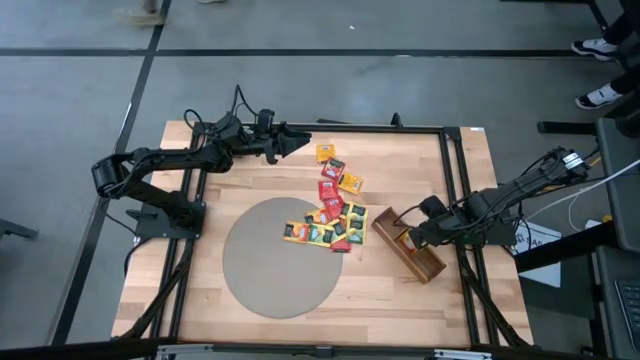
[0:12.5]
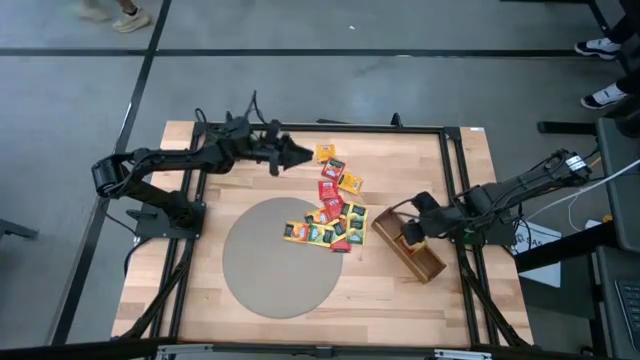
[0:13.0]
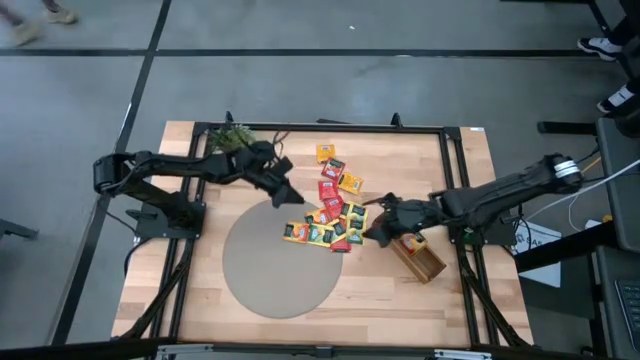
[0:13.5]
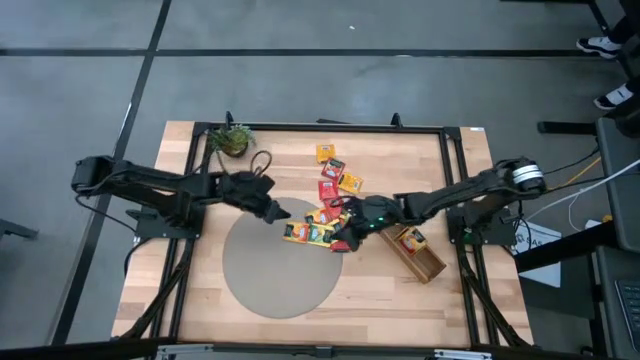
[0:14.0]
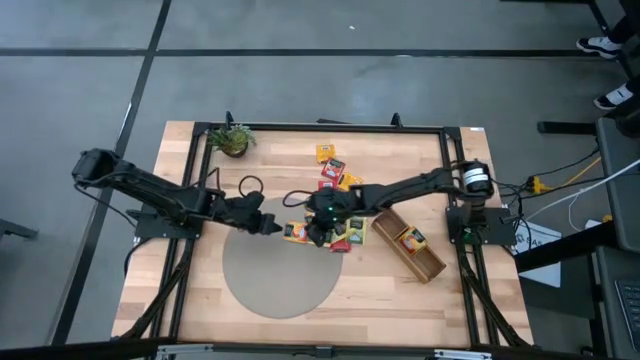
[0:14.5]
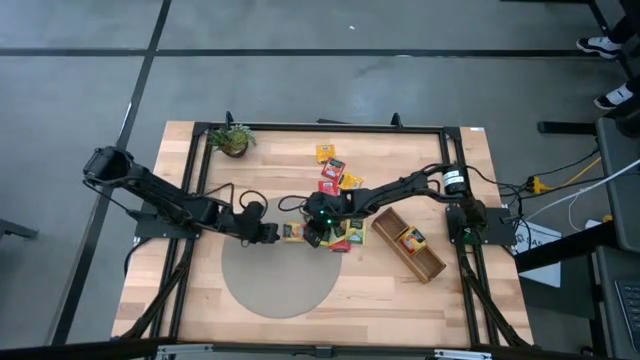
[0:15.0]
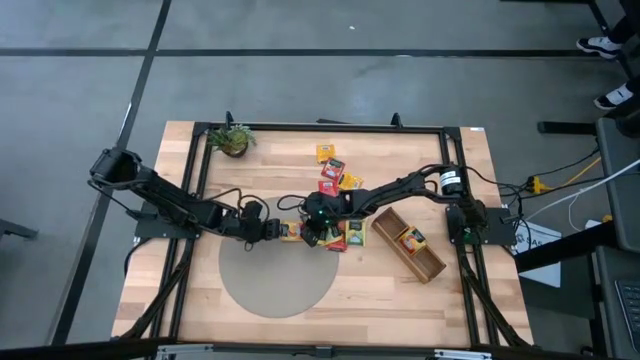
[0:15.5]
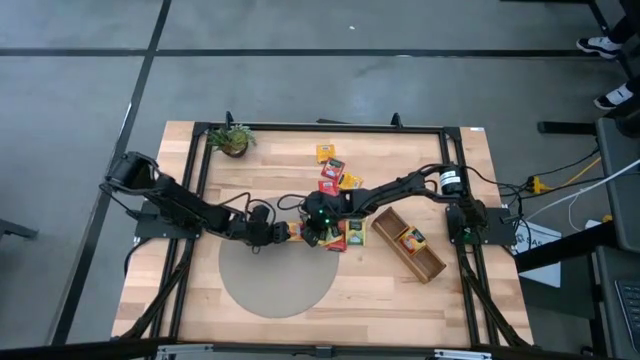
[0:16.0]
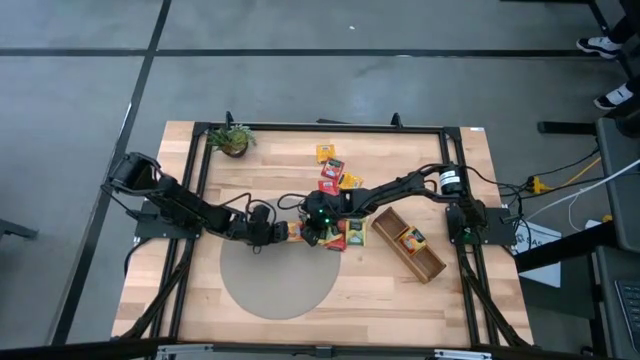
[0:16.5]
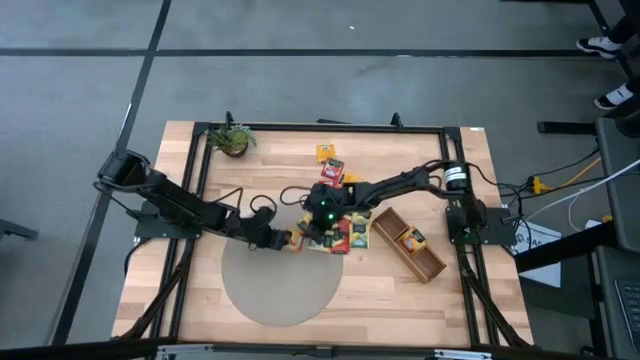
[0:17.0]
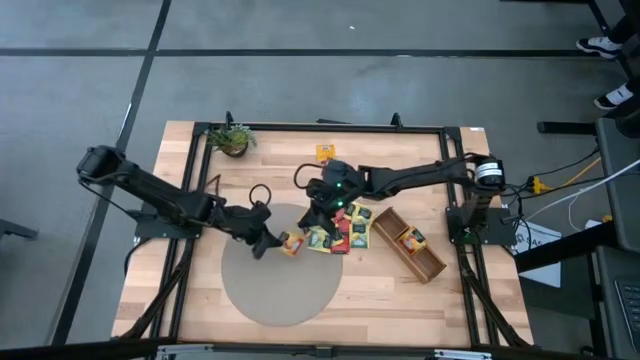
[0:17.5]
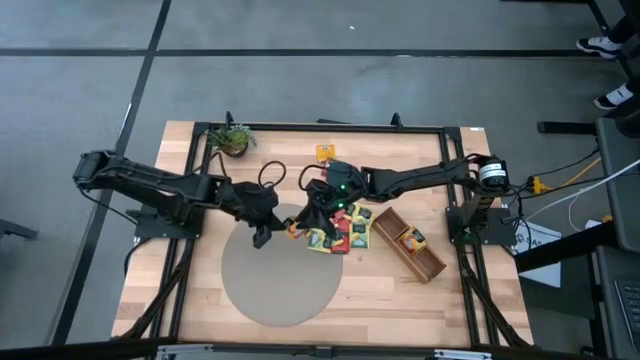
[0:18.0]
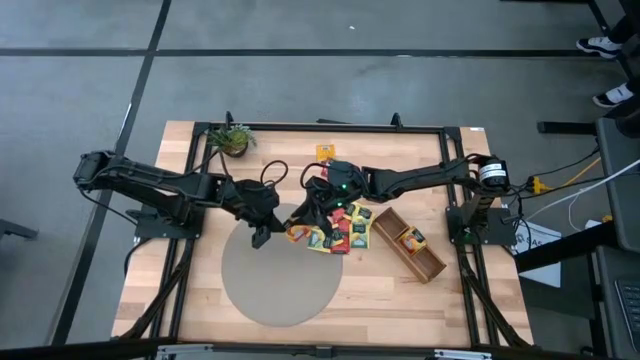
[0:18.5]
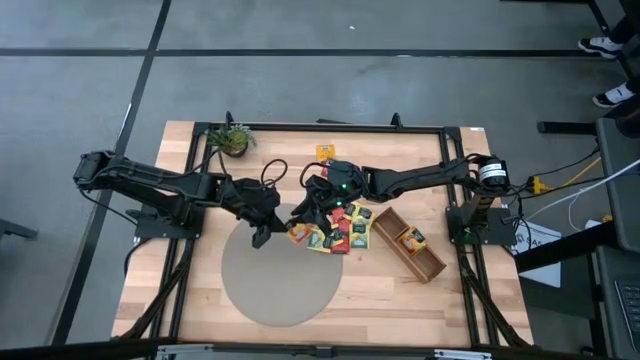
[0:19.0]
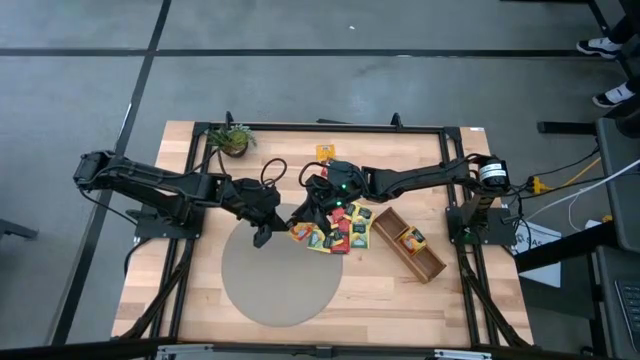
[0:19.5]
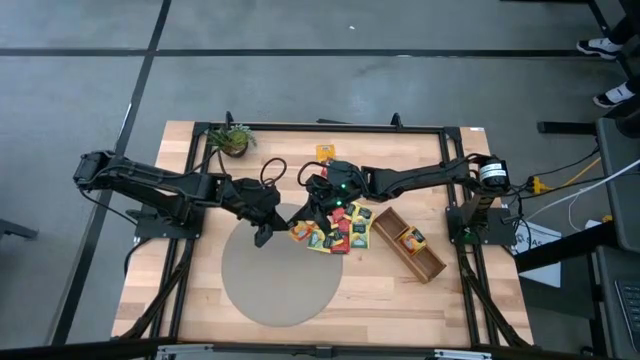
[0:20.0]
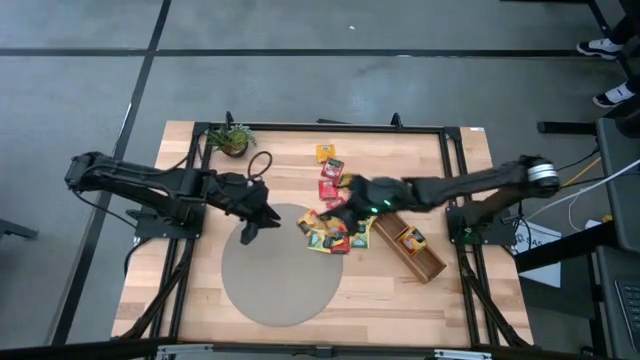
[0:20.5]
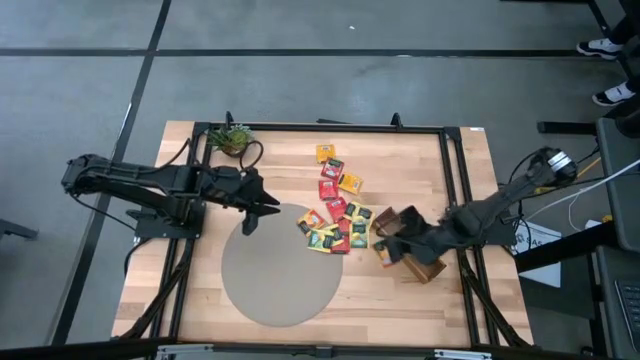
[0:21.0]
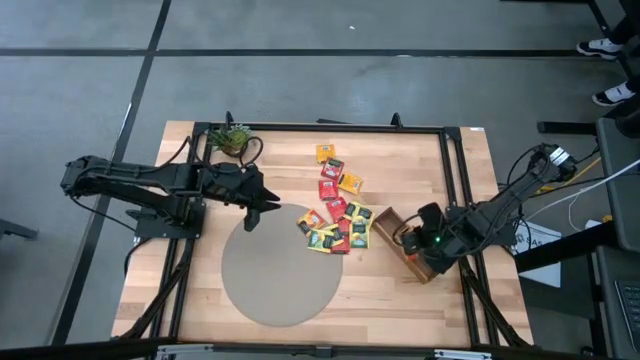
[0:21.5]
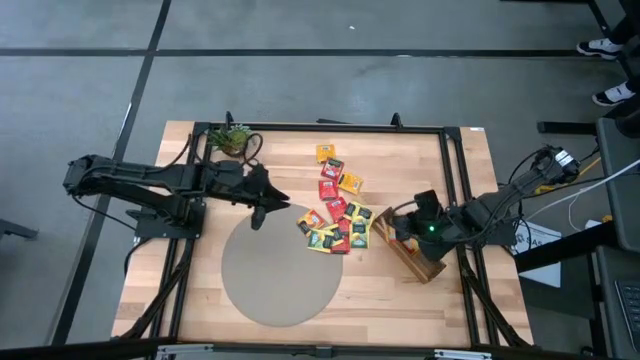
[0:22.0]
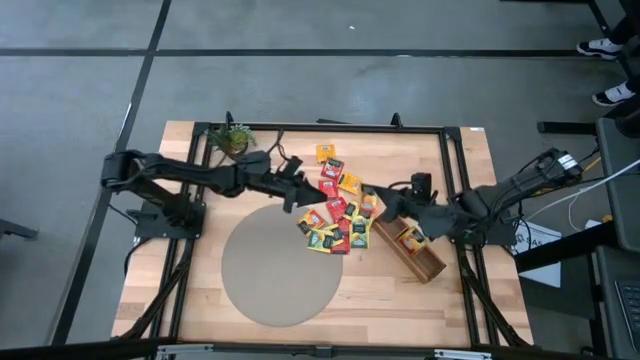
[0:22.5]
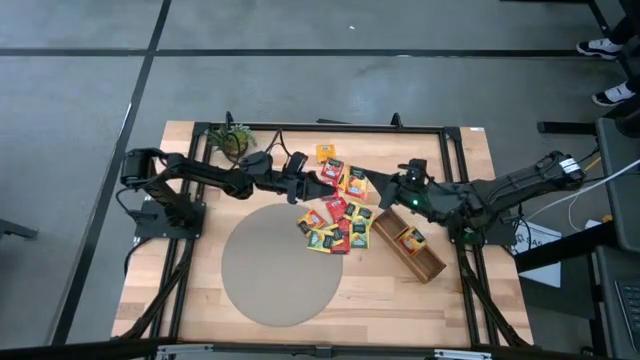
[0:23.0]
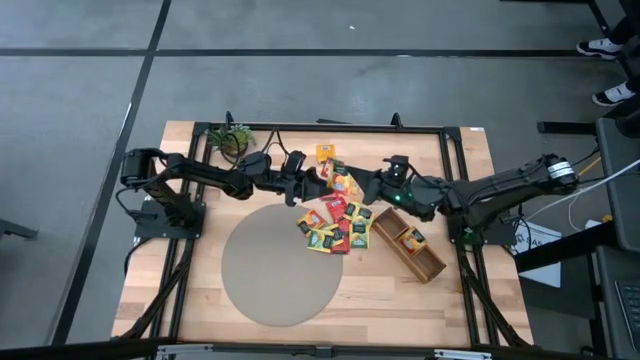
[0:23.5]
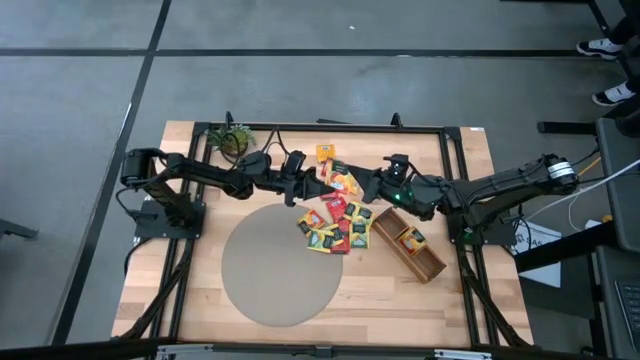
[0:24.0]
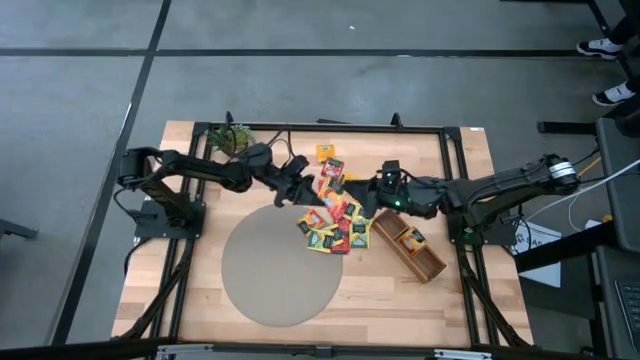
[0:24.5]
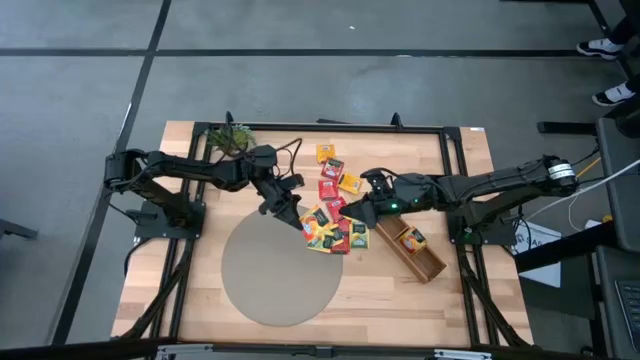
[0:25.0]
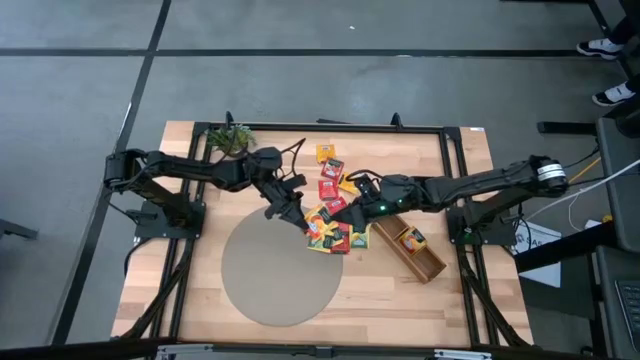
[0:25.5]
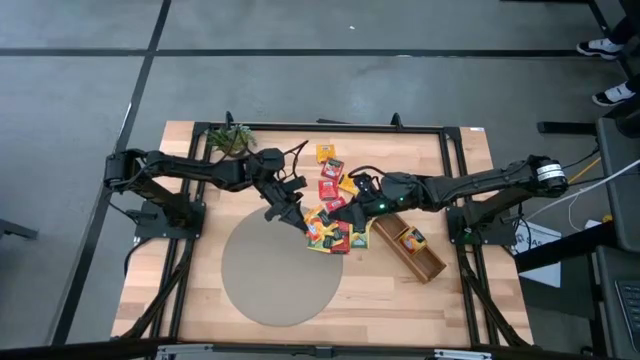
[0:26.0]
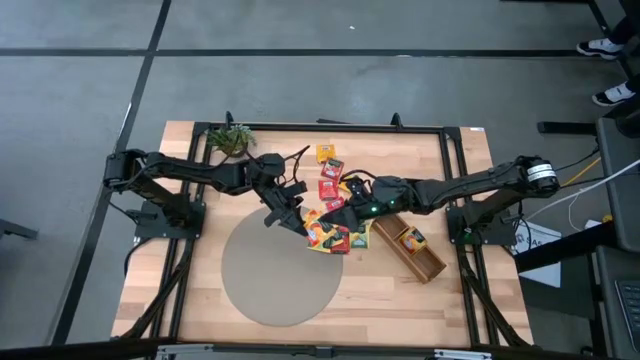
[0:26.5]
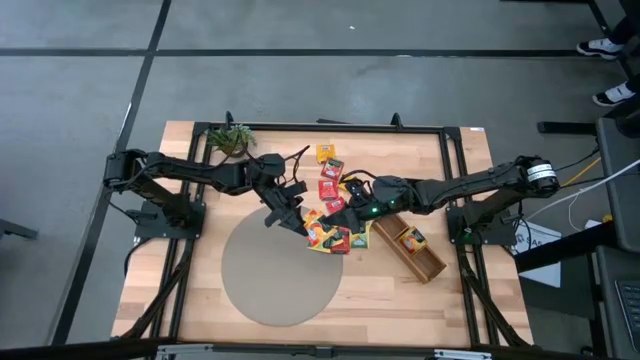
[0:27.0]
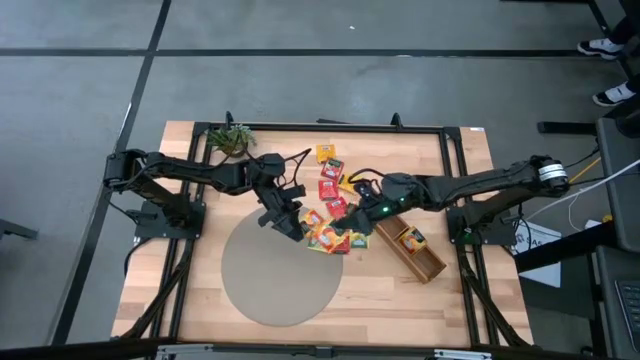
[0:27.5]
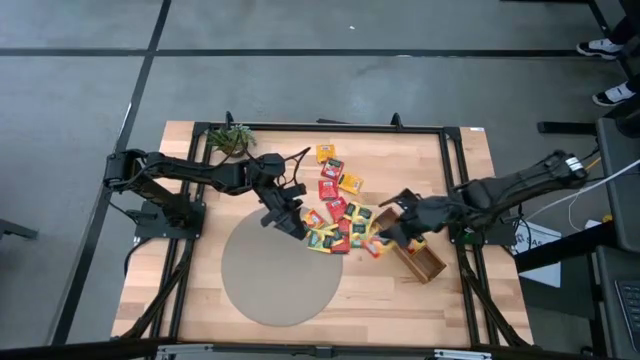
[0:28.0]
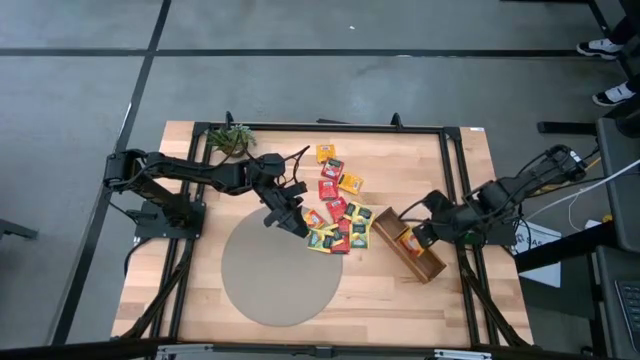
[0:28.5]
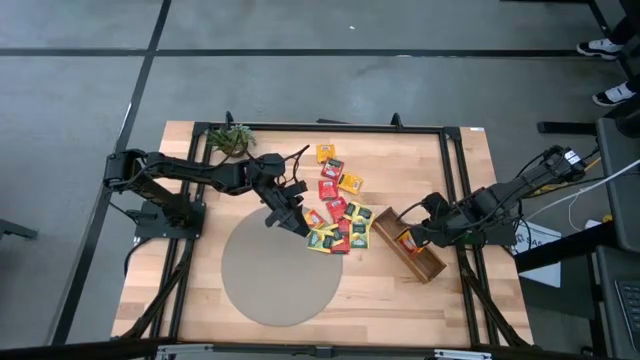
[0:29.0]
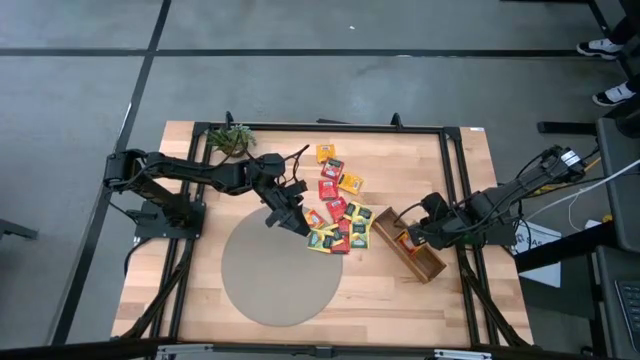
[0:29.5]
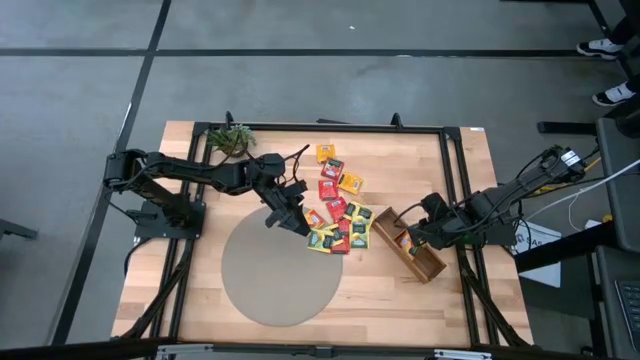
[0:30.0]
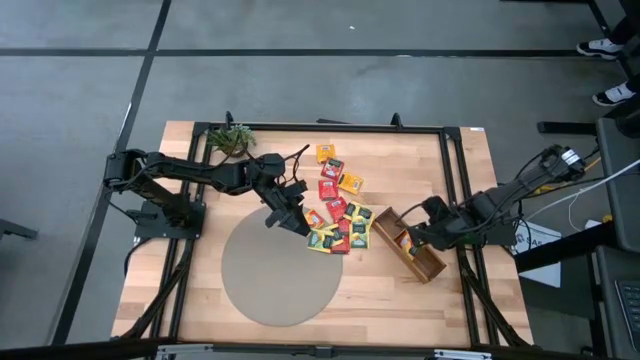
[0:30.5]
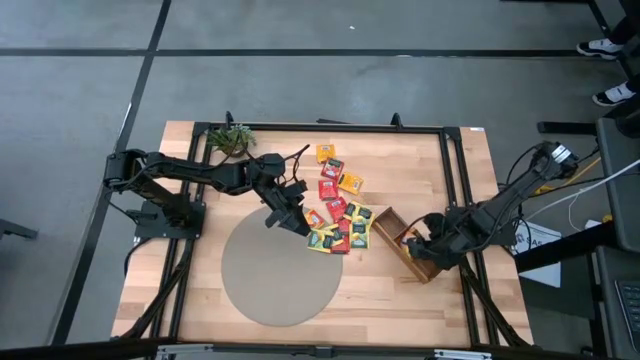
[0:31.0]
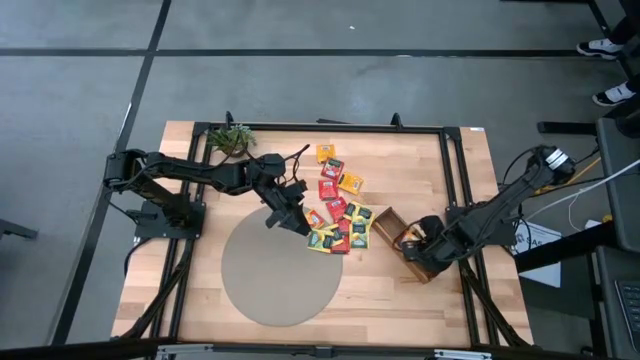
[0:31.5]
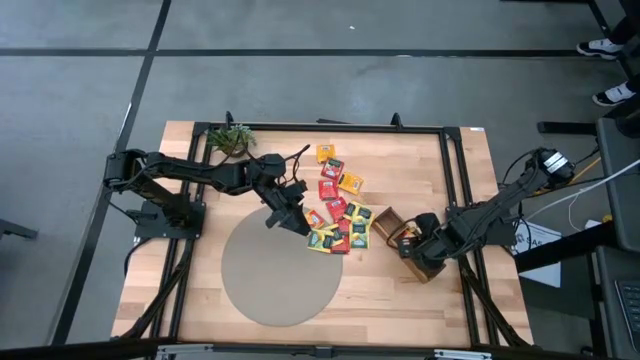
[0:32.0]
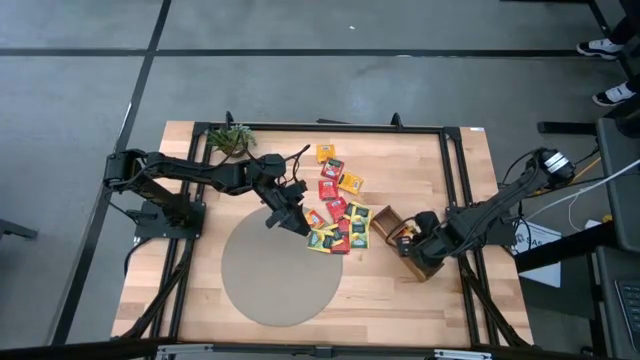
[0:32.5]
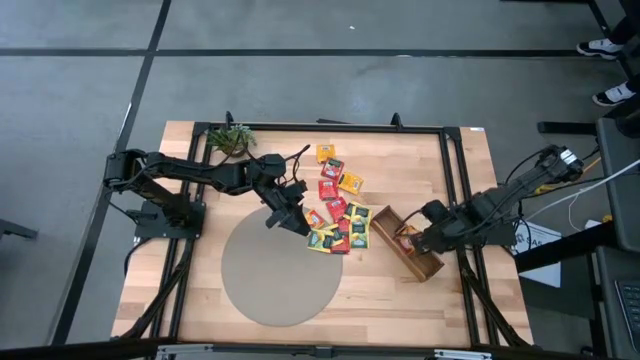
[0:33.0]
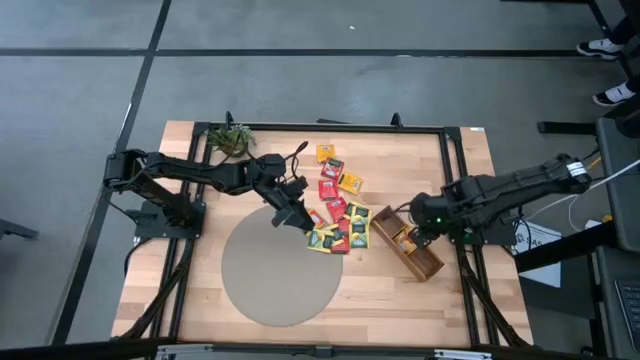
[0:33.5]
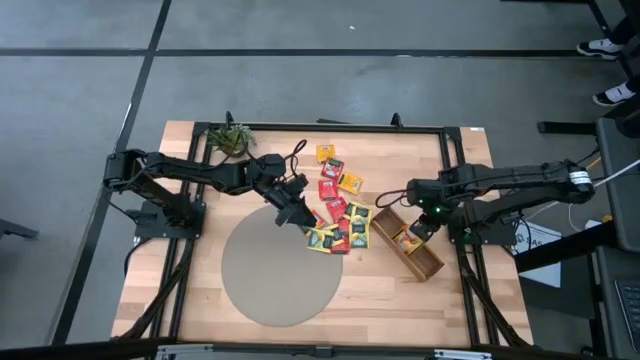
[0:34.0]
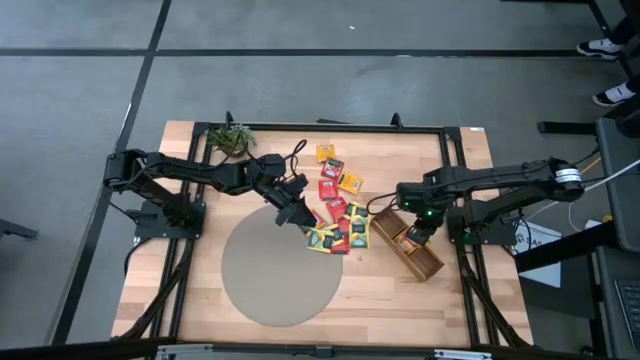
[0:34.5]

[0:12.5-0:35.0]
Task: Pick & Place Tea
Put the orange tea bag into the middle of the wooden organizer
